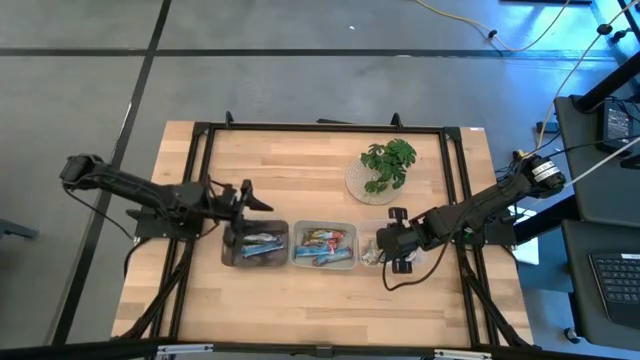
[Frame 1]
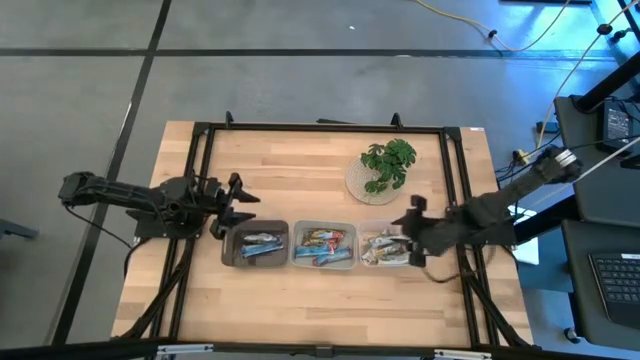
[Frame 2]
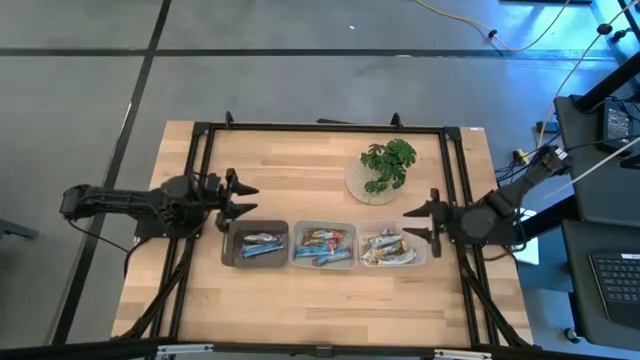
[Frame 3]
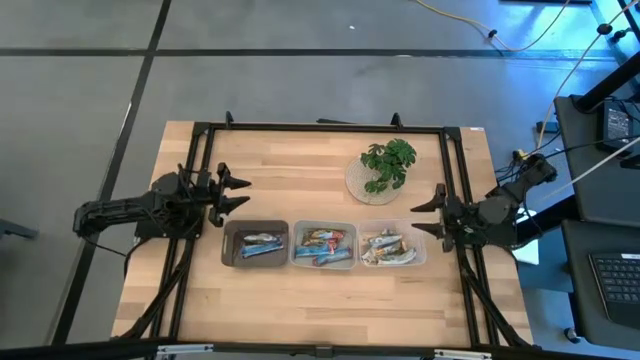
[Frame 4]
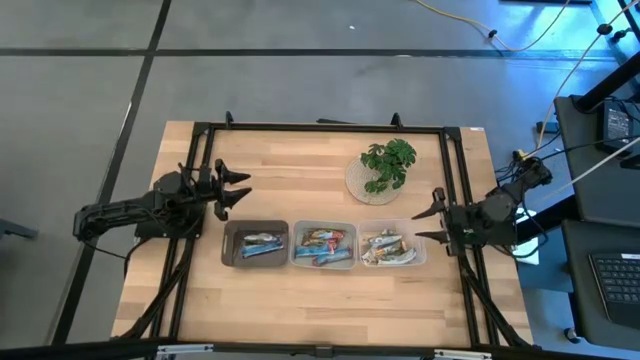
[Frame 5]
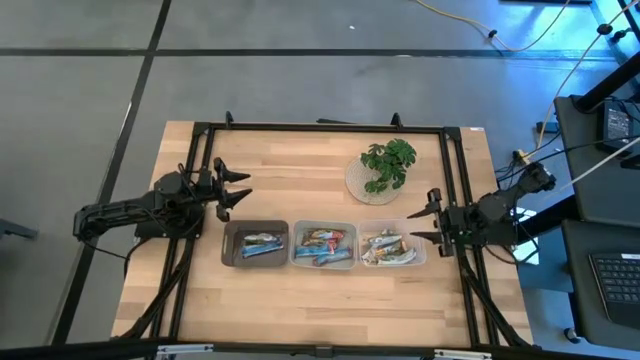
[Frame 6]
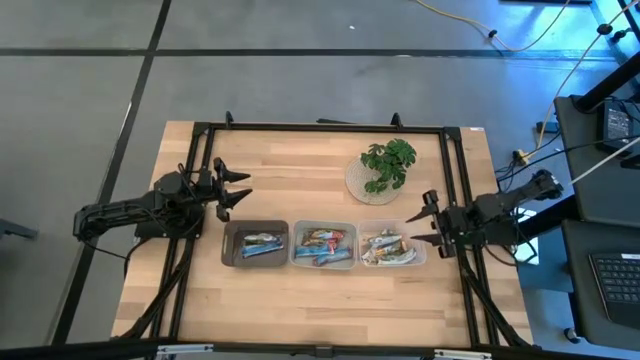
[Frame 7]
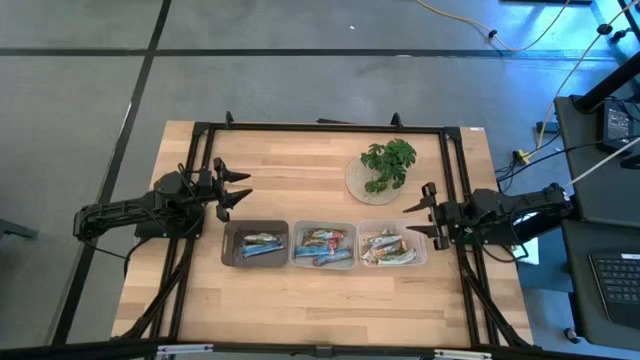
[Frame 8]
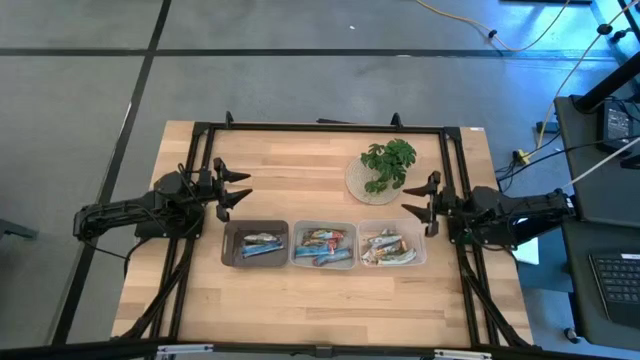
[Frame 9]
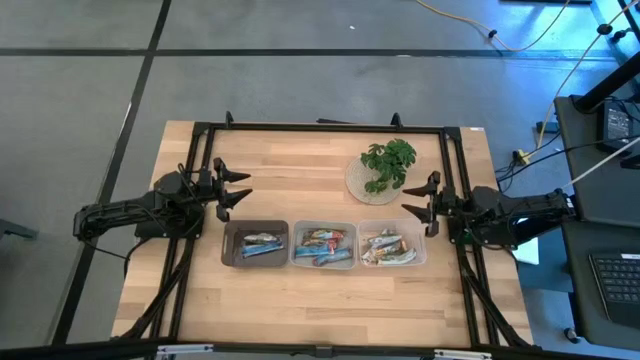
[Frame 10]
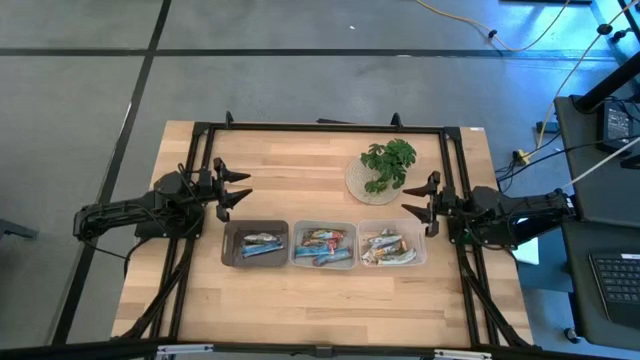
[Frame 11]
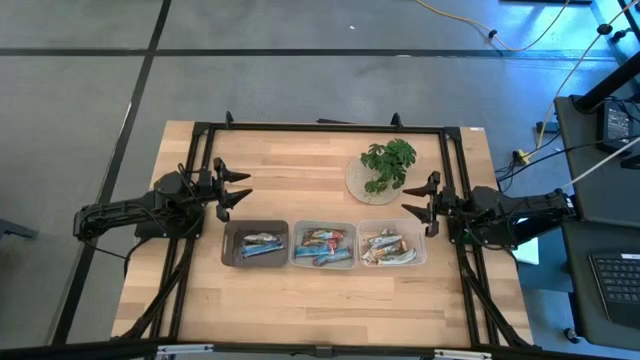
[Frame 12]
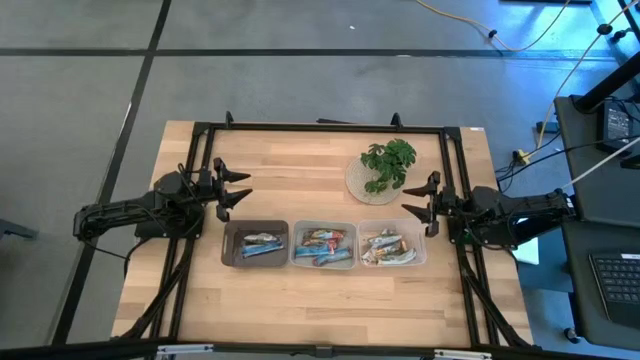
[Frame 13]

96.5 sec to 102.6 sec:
Task: Pick and place Granola Bars by type
Return to Home Position

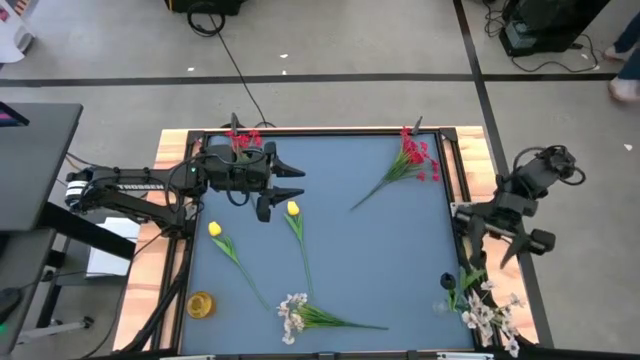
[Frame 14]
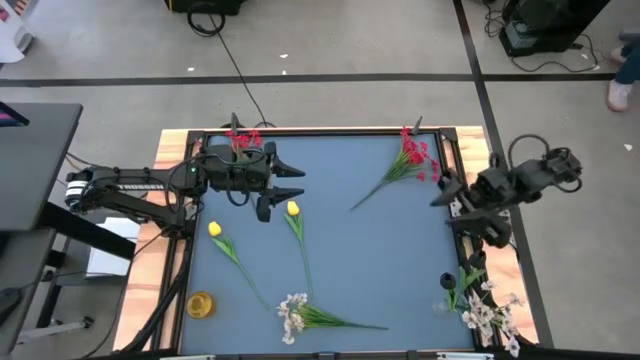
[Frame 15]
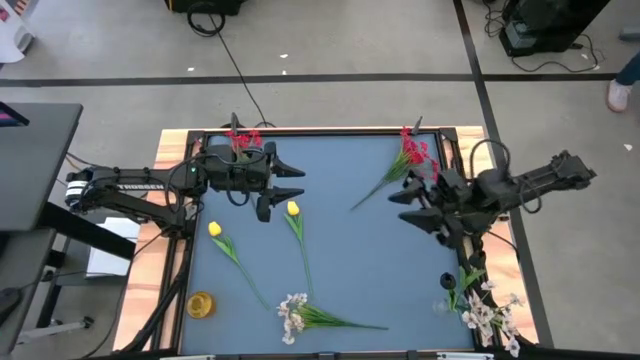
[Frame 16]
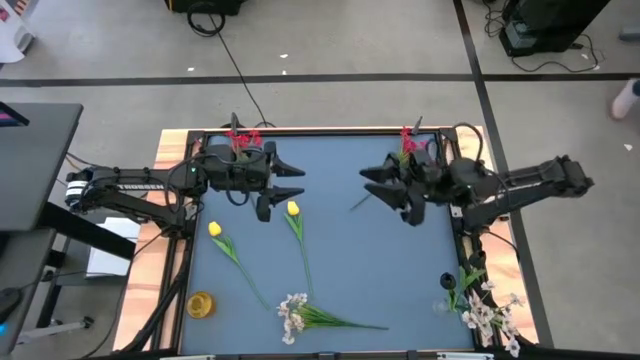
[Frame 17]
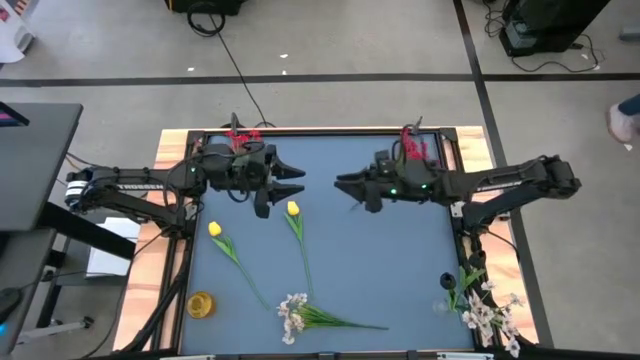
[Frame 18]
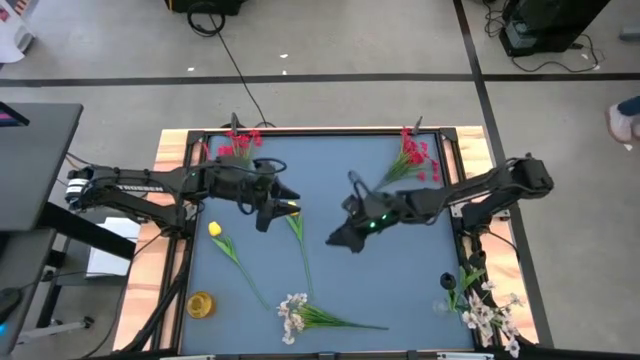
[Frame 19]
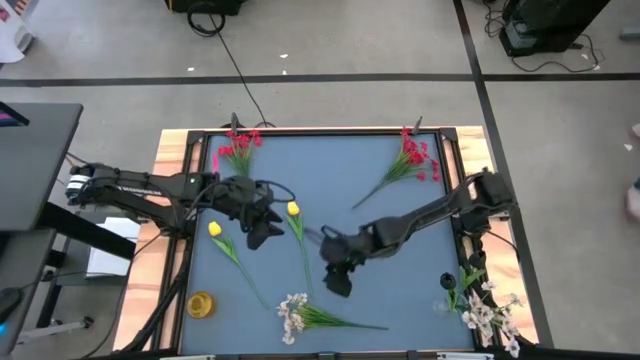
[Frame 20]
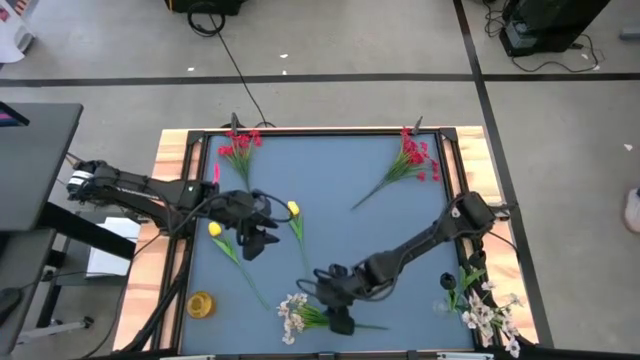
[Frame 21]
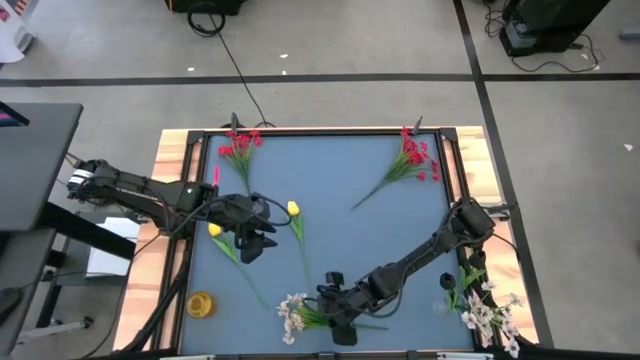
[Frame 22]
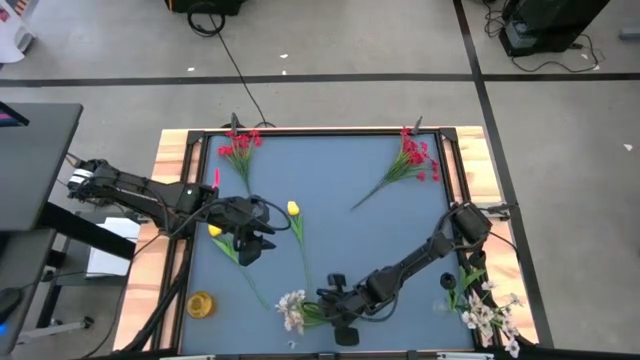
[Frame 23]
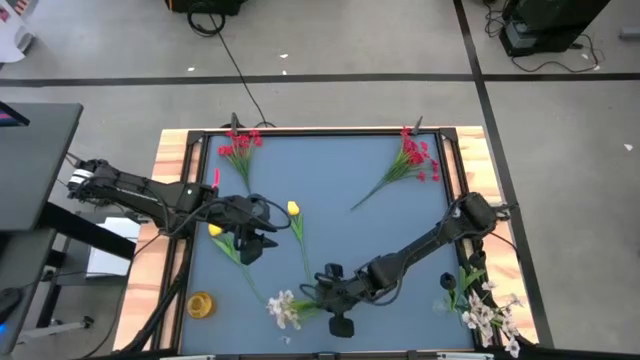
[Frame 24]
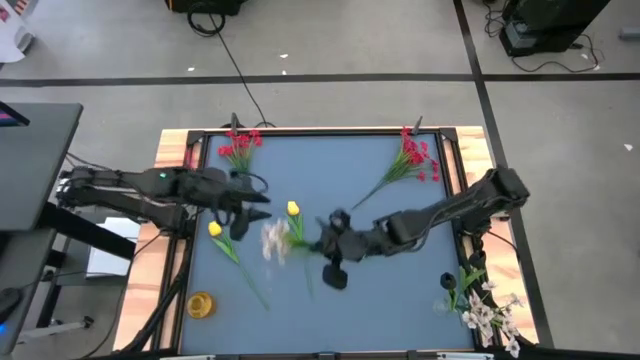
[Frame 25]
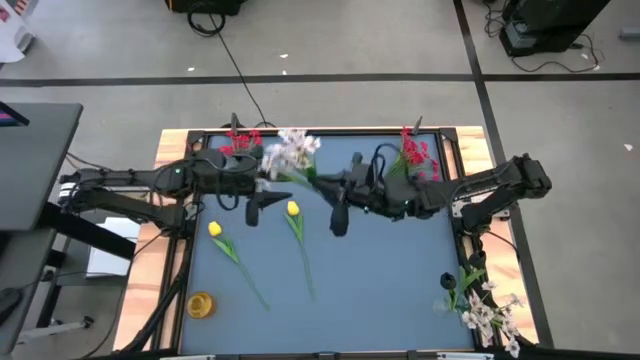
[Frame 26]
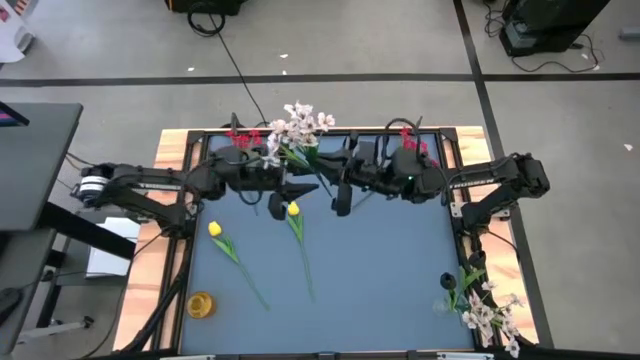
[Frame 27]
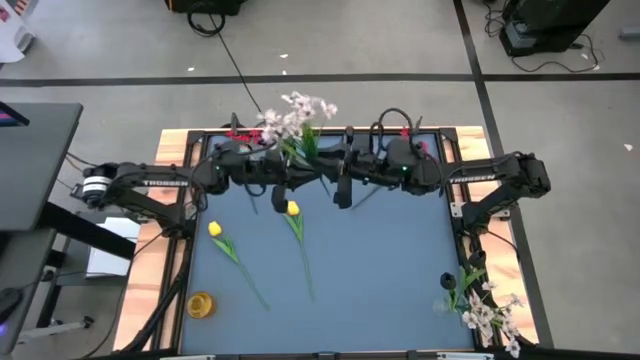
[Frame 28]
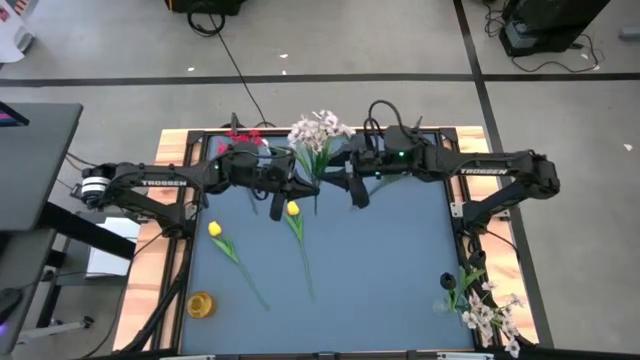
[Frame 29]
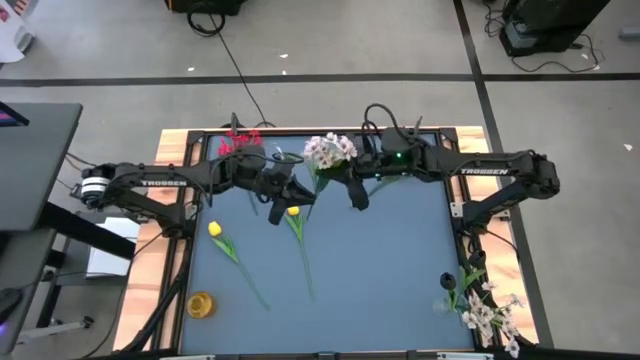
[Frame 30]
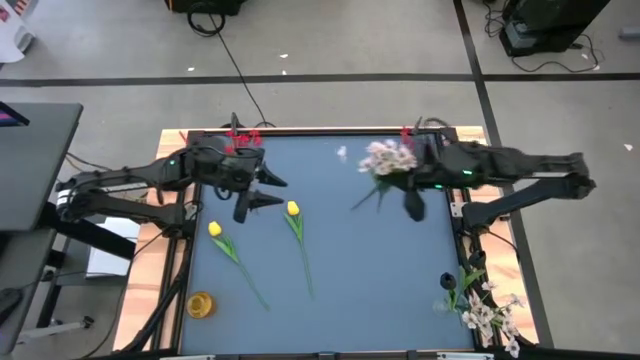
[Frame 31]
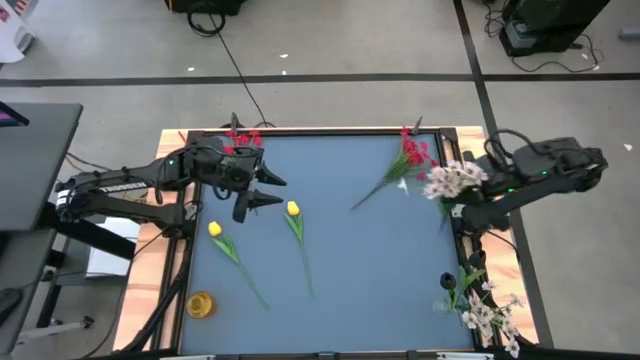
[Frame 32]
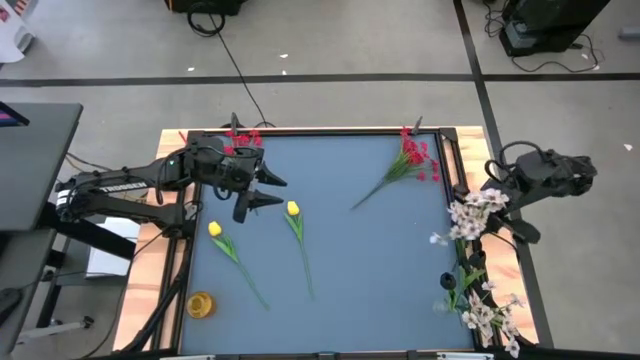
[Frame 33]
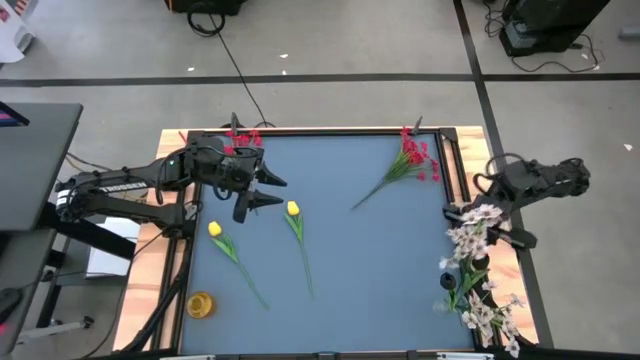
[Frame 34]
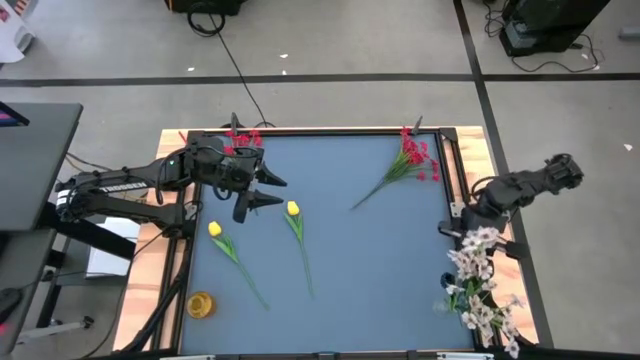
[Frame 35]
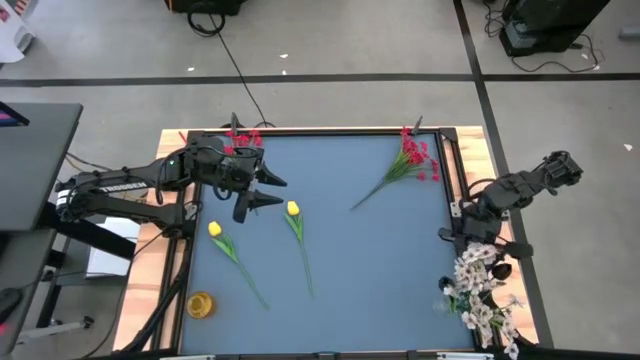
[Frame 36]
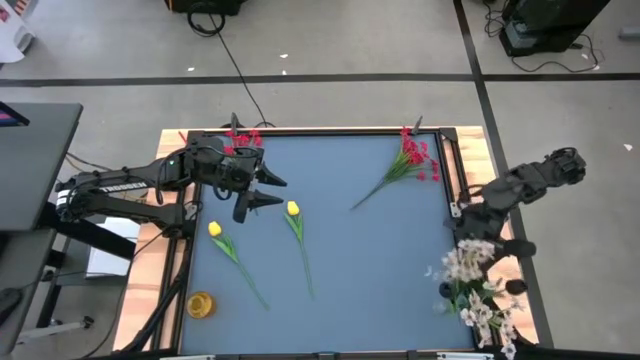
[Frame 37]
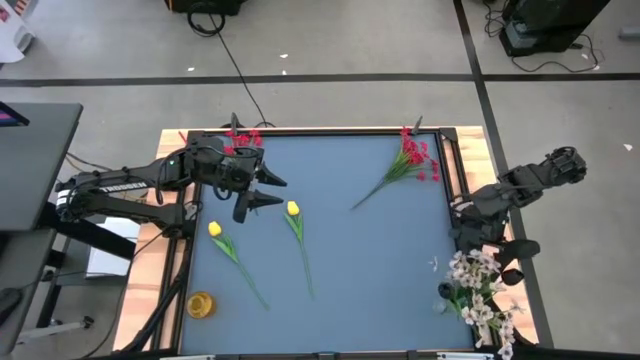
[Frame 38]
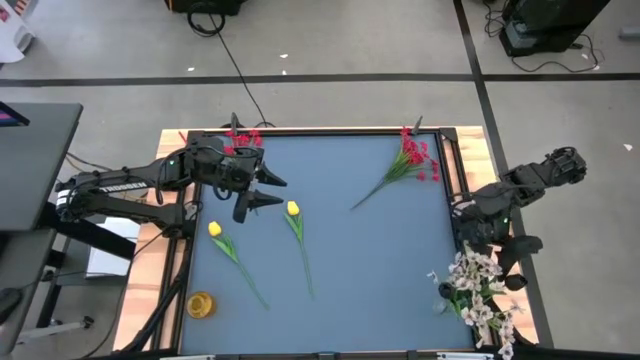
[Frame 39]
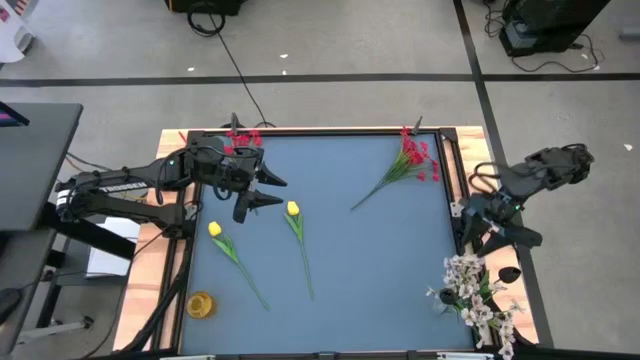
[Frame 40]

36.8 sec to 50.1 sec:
Task: Sort flowers into vase by color
Put the white flowers into the transparent vase
